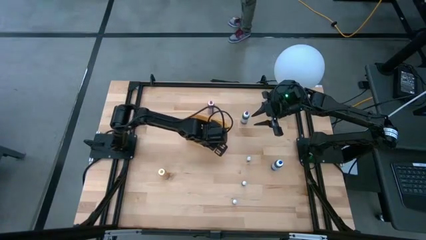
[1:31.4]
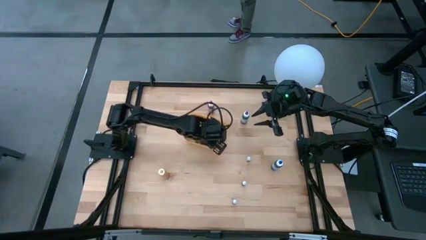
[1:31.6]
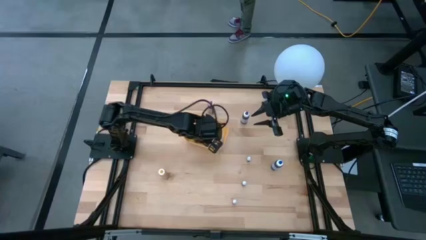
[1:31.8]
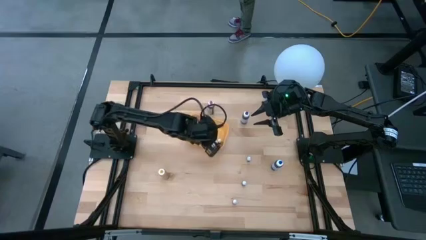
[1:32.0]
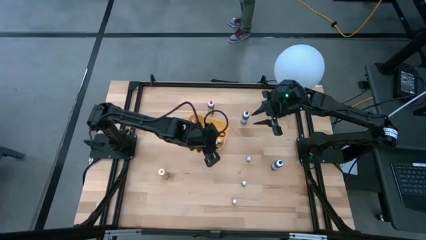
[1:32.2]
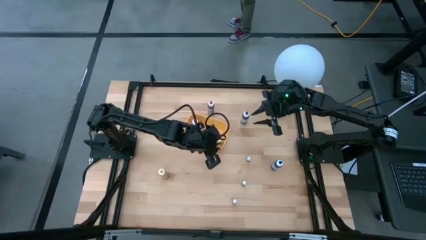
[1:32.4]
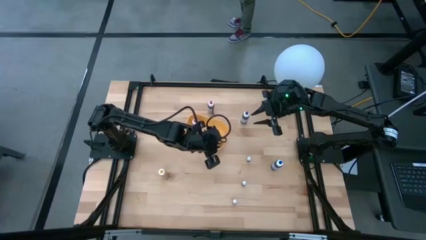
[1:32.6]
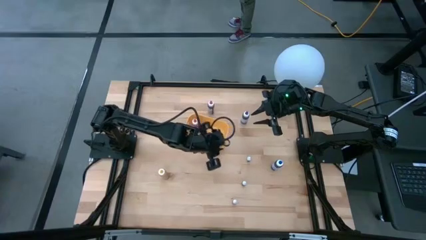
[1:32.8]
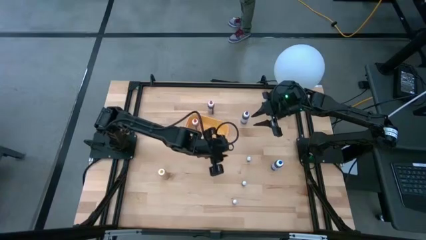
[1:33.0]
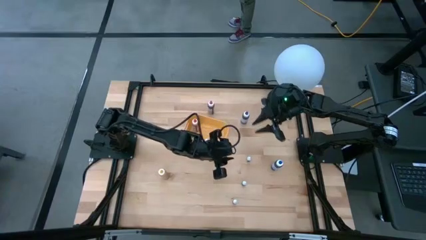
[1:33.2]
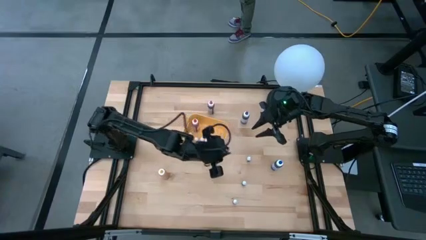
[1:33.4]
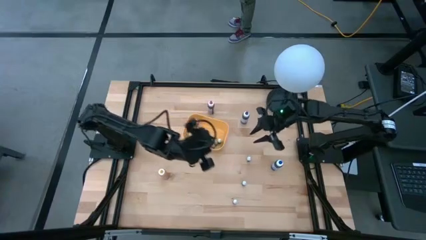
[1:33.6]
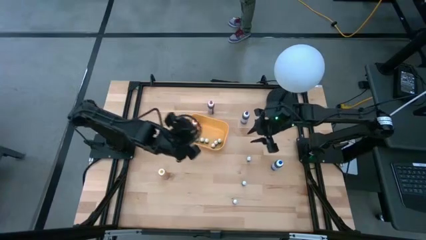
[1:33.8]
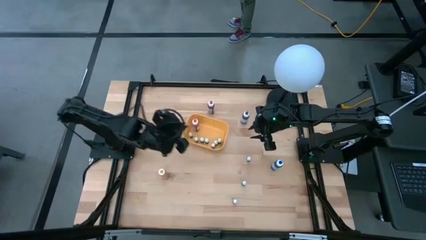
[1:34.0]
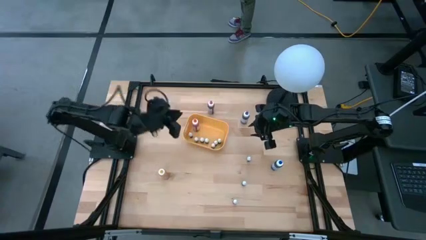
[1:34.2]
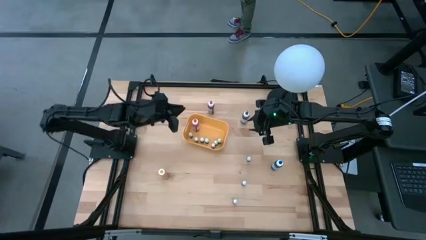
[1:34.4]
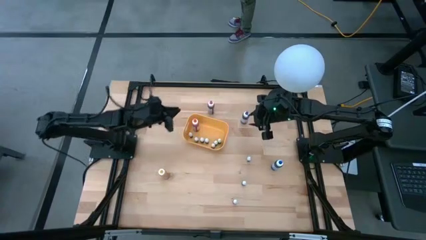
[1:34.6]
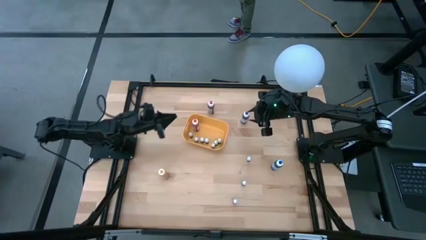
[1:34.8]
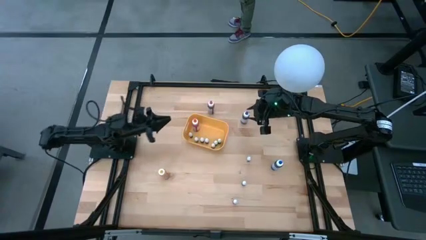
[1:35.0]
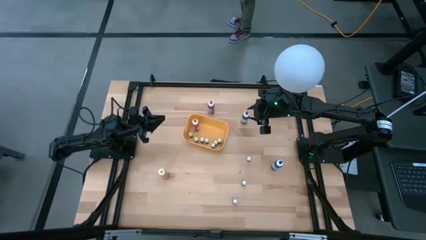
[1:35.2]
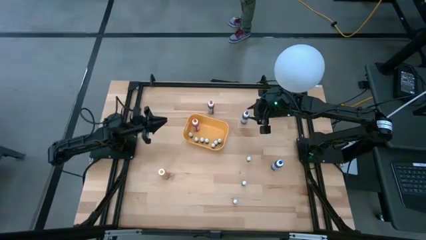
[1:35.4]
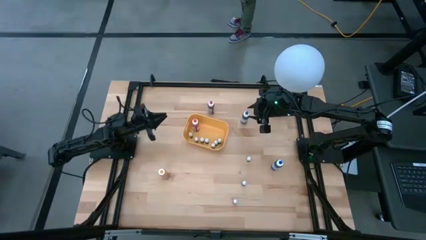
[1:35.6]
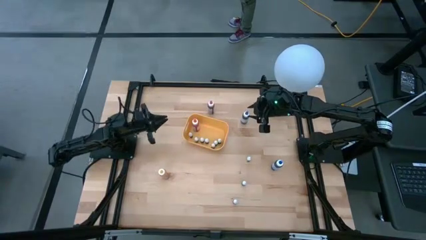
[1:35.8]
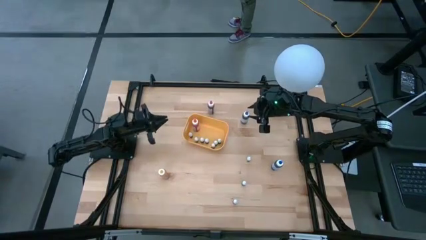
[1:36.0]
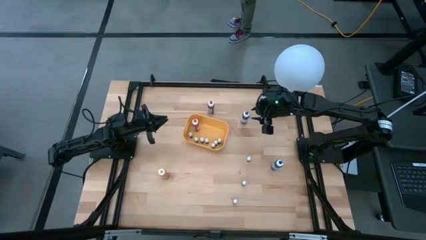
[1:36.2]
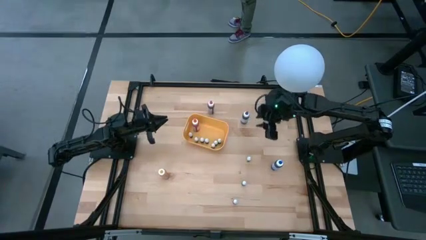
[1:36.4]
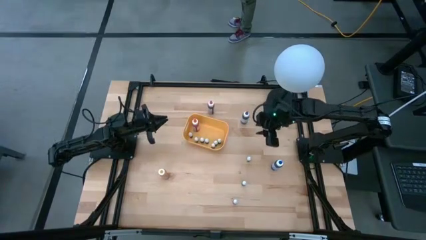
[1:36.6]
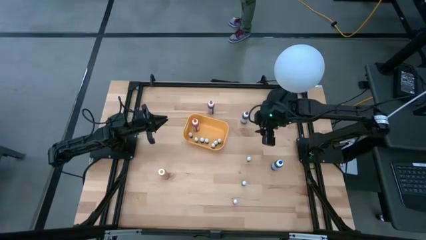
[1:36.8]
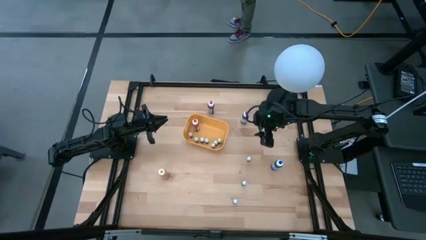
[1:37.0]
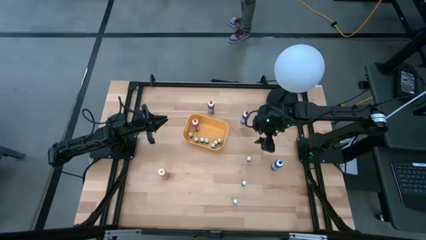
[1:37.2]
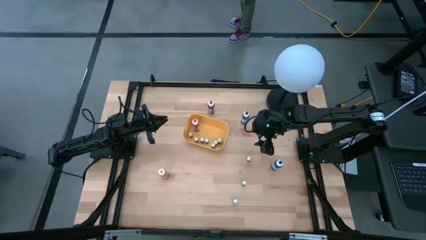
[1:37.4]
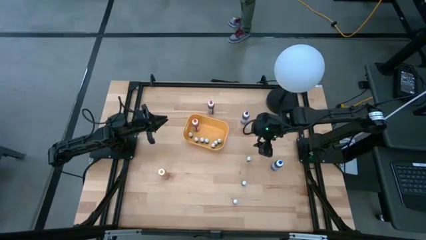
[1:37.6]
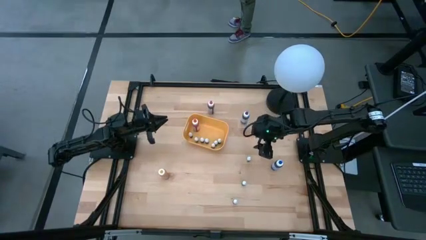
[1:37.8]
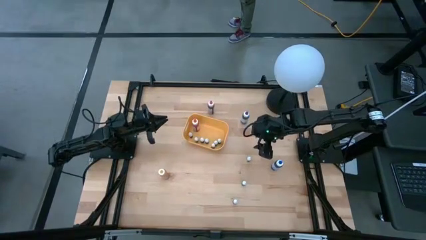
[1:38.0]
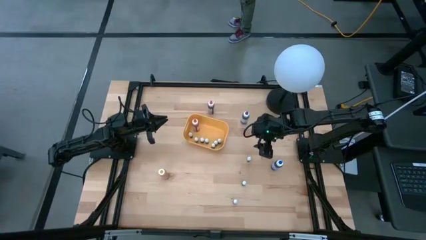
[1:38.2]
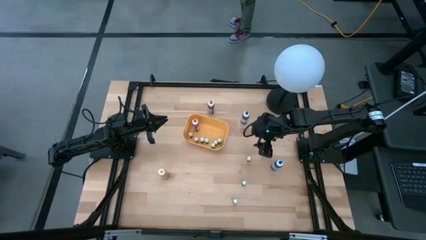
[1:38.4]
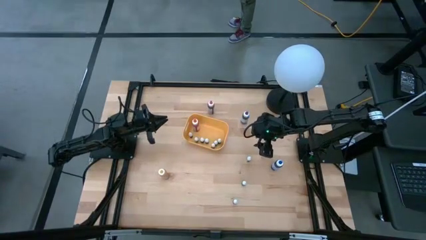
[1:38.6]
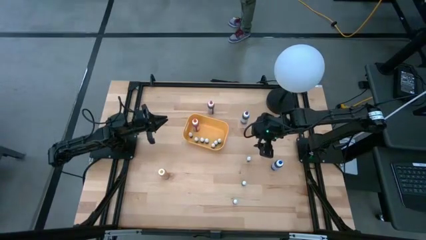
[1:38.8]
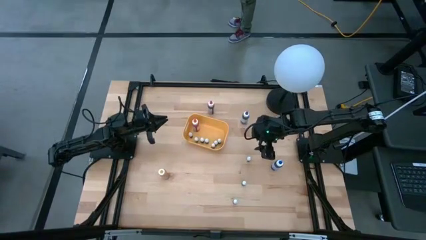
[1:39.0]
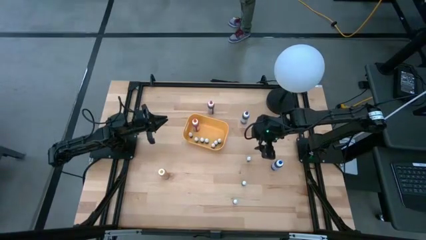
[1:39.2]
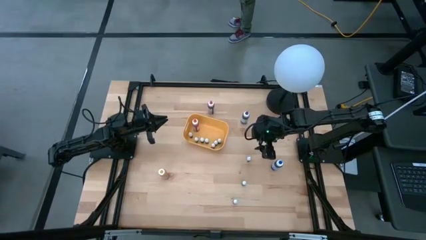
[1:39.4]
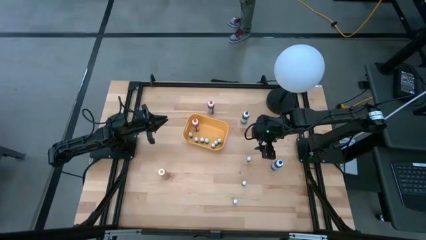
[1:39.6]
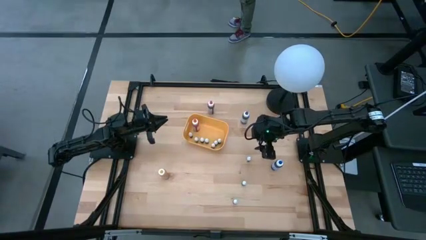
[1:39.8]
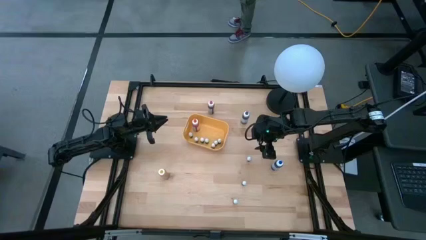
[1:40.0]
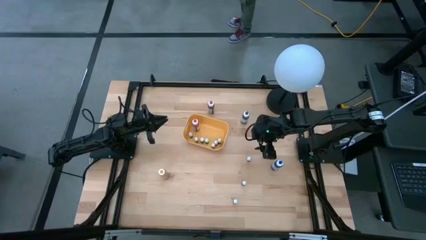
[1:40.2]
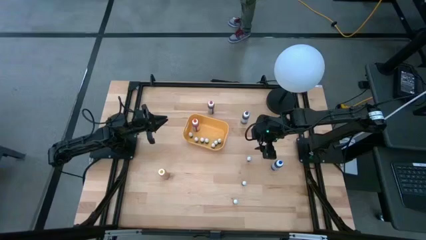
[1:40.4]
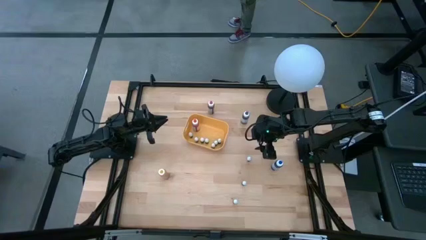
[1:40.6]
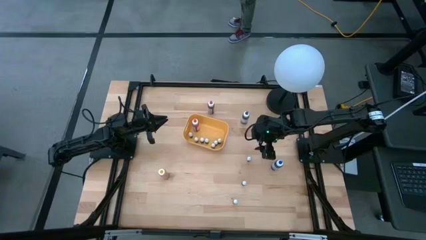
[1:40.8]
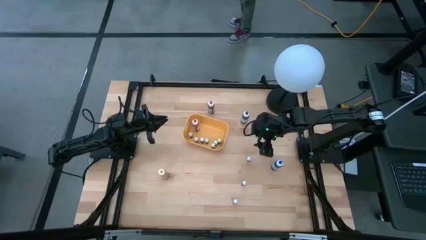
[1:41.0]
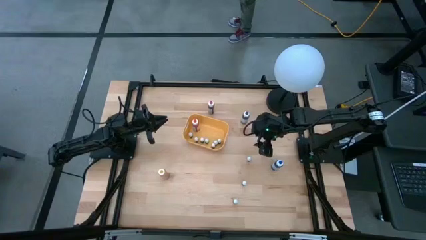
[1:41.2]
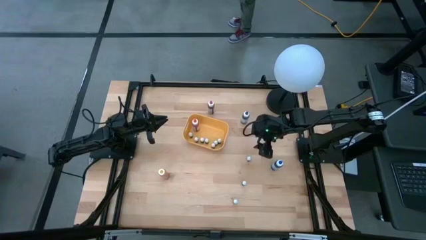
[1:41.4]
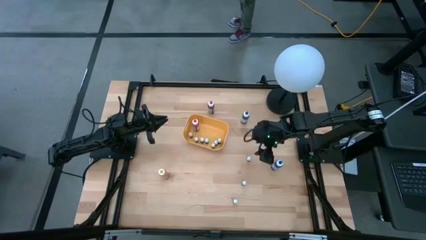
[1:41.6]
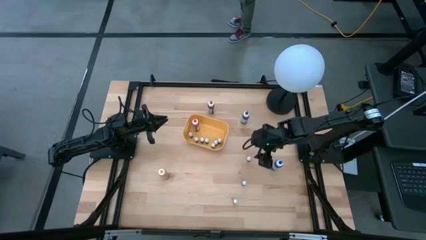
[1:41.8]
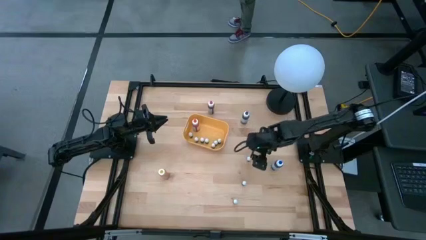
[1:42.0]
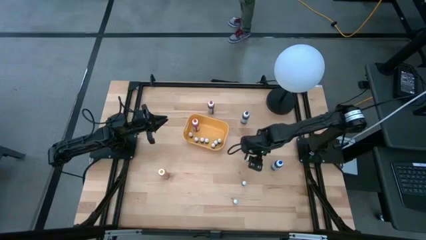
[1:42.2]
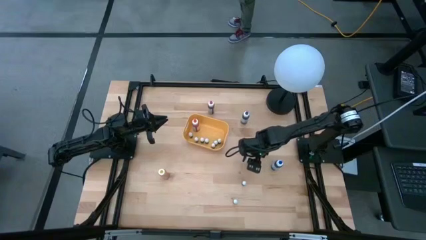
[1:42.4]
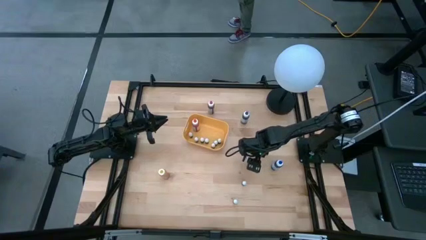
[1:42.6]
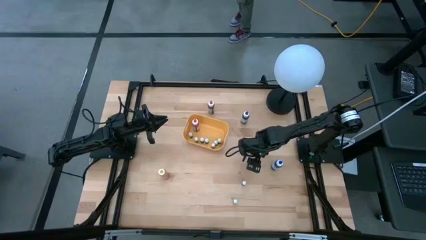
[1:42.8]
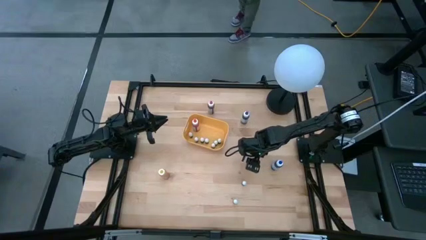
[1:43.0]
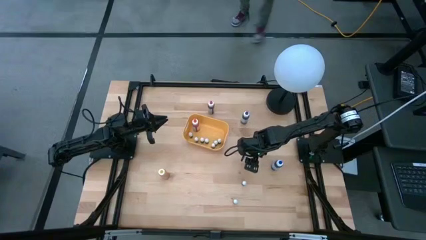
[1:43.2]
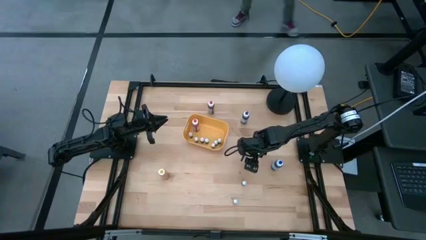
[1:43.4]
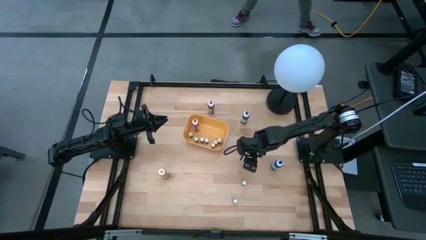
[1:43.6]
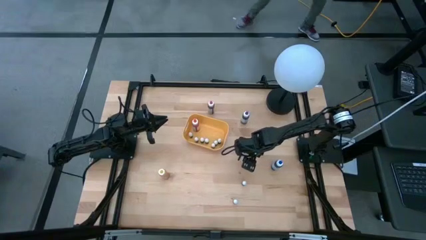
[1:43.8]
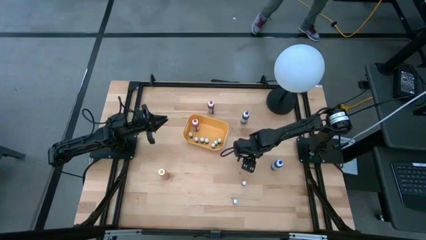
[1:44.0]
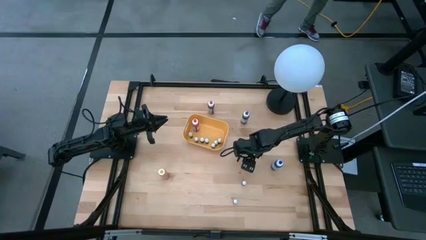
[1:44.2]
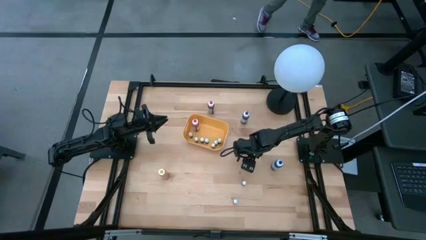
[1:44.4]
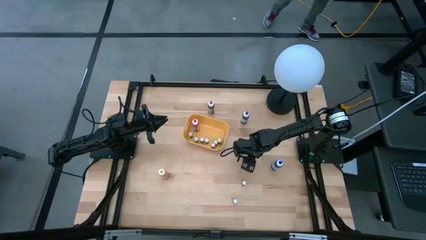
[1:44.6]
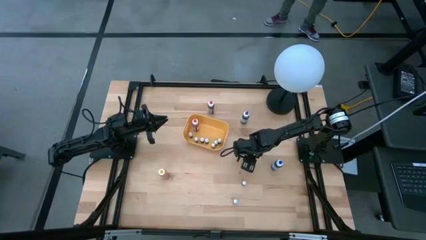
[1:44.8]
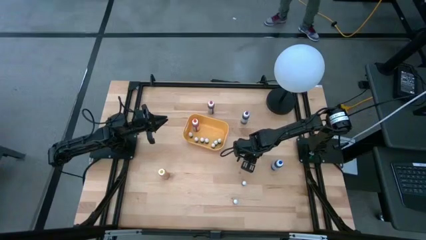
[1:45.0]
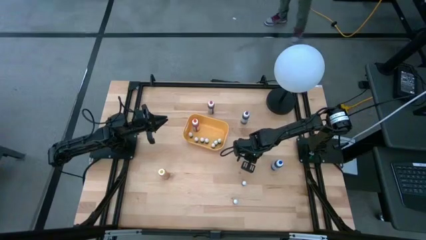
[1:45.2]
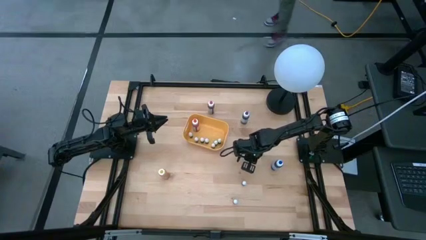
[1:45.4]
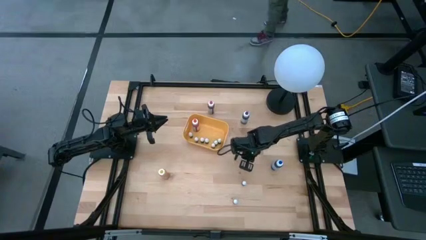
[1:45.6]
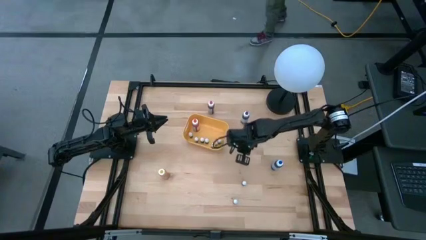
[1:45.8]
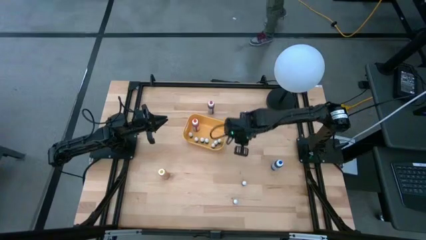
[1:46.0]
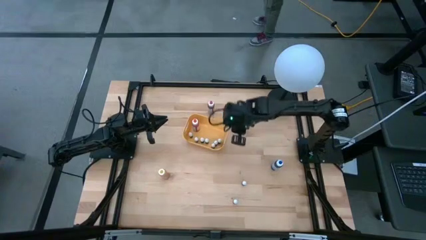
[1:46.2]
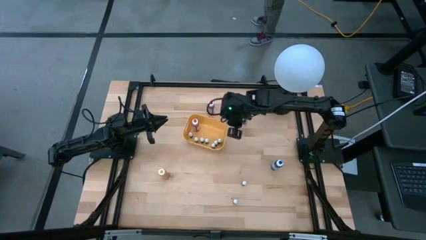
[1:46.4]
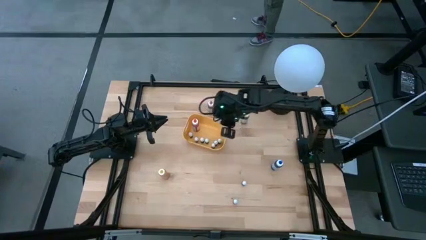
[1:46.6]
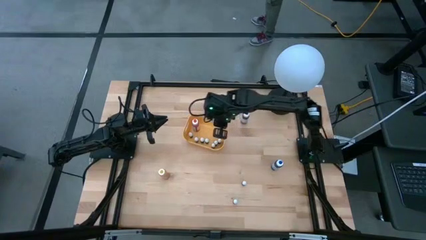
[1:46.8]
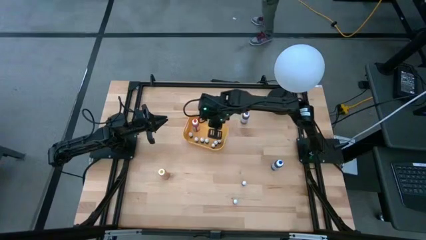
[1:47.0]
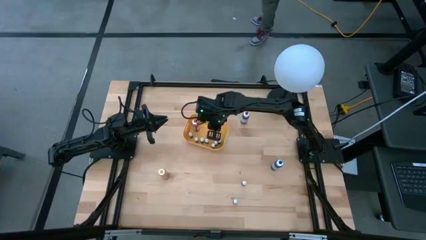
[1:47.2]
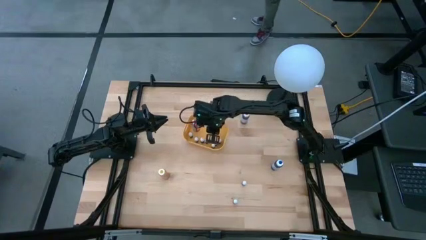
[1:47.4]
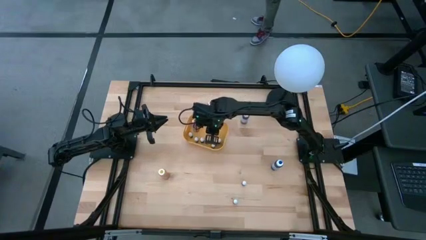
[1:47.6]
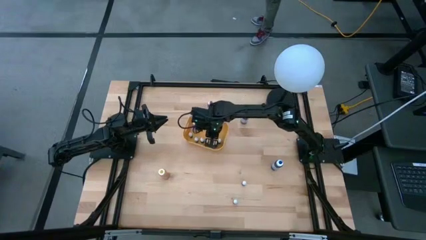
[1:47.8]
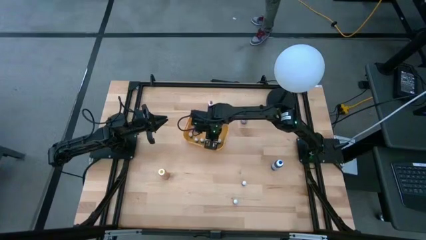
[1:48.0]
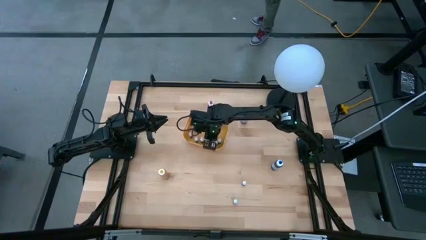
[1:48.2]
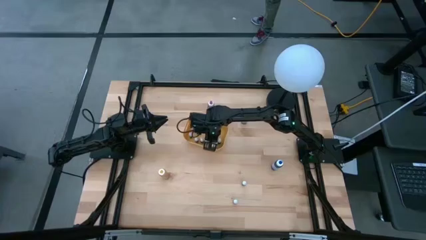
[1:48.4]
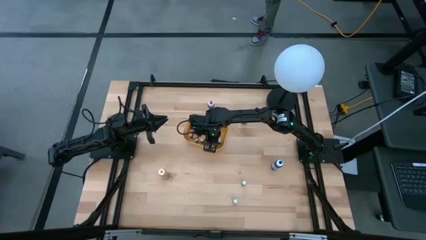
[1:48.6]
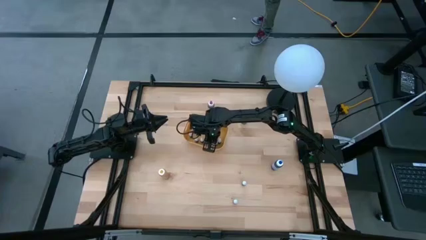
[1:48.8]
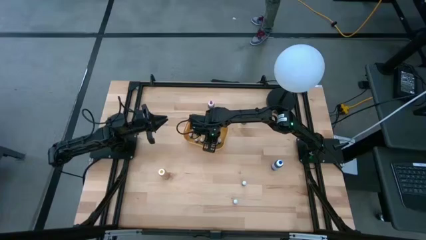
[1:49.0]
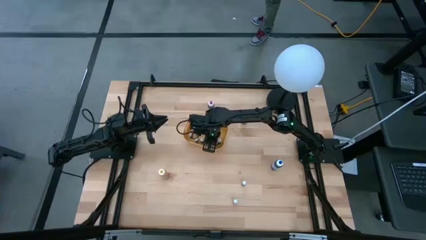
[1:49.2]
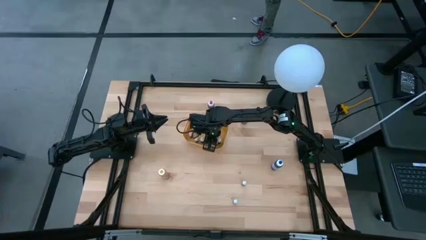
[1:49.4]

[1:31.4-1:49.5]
Task: Pick & Place food coloring
Put the small black food coloring bottle into the yellow bin
